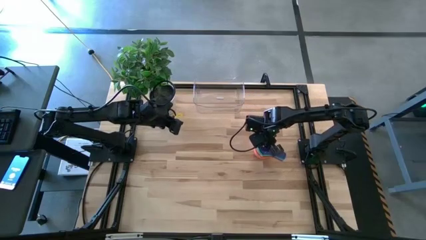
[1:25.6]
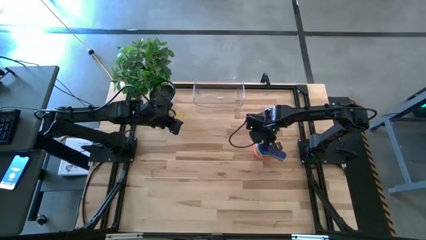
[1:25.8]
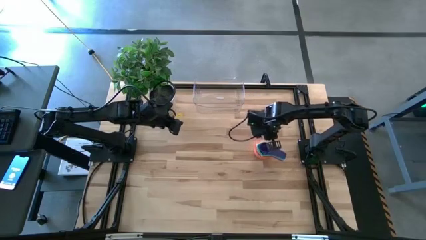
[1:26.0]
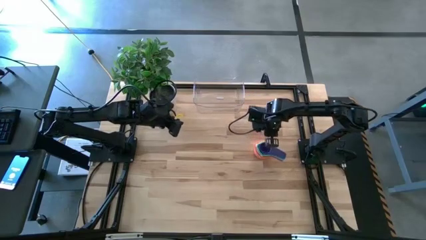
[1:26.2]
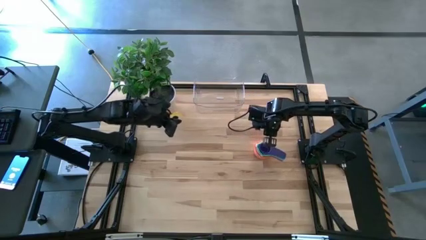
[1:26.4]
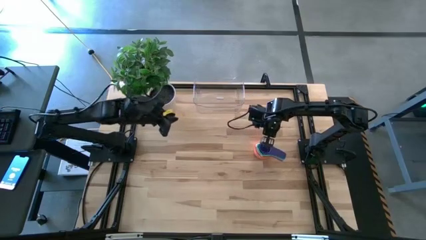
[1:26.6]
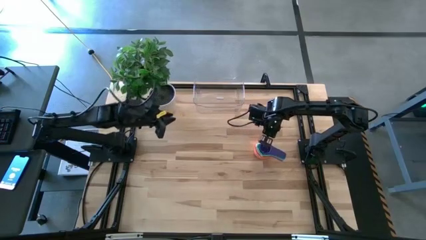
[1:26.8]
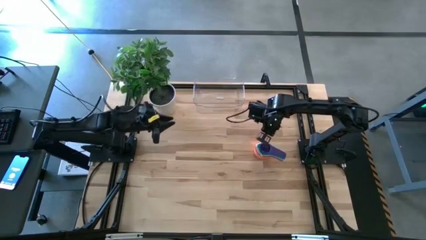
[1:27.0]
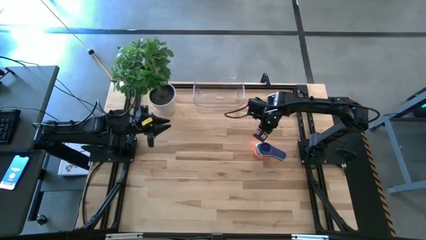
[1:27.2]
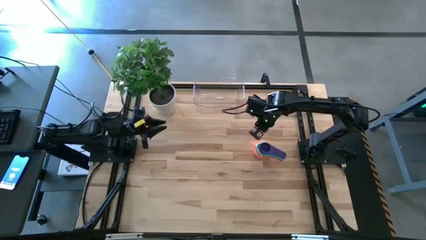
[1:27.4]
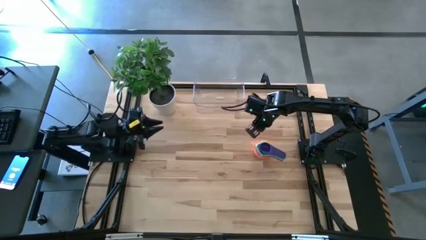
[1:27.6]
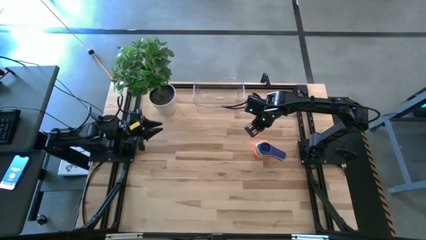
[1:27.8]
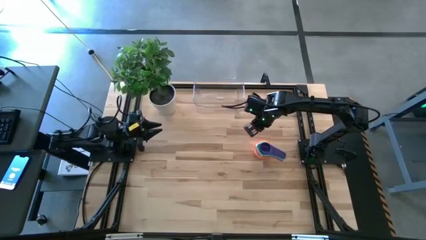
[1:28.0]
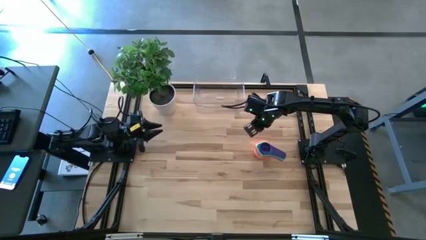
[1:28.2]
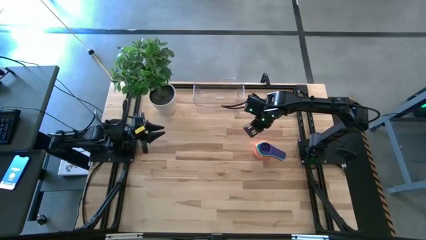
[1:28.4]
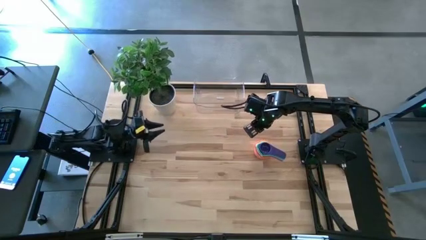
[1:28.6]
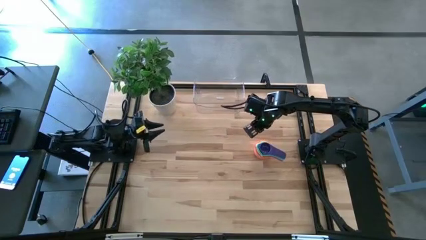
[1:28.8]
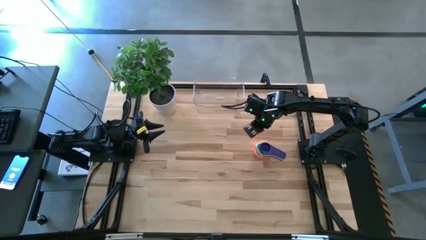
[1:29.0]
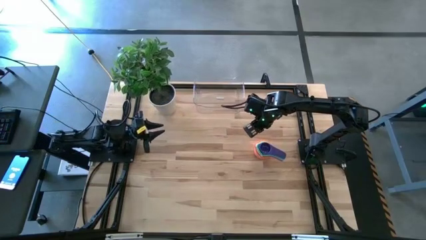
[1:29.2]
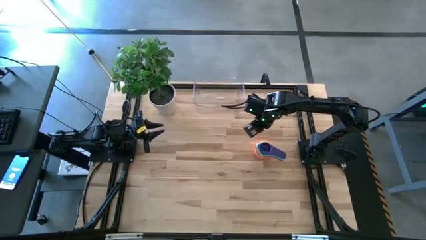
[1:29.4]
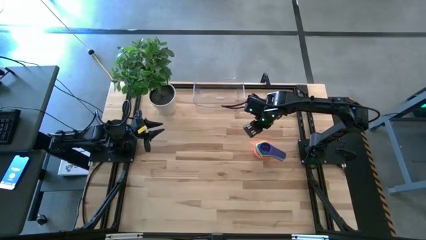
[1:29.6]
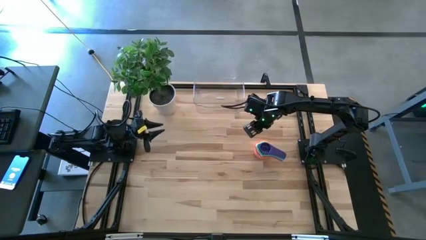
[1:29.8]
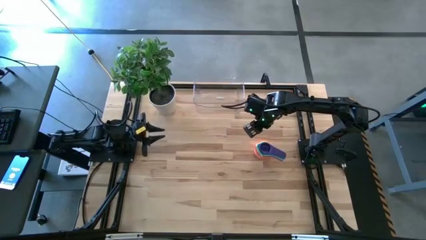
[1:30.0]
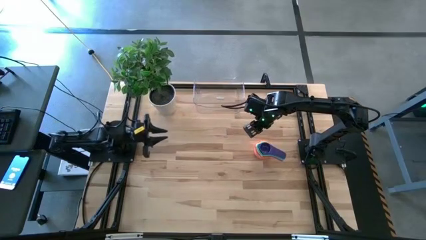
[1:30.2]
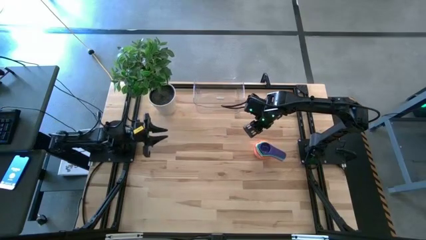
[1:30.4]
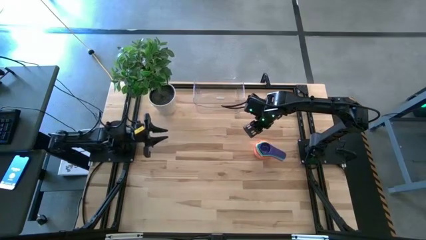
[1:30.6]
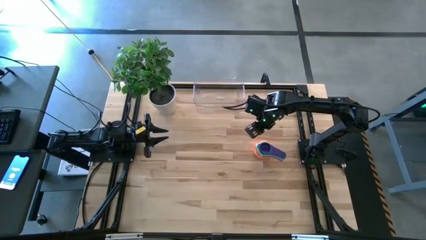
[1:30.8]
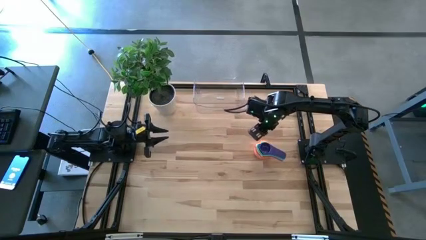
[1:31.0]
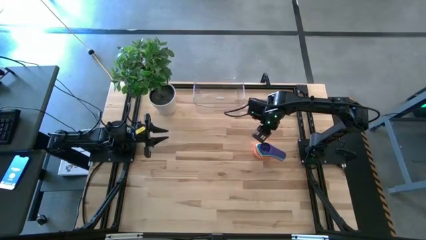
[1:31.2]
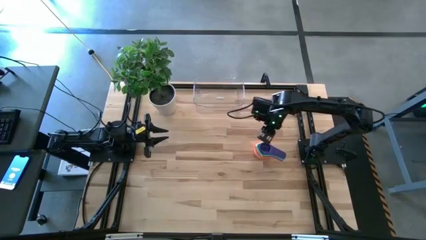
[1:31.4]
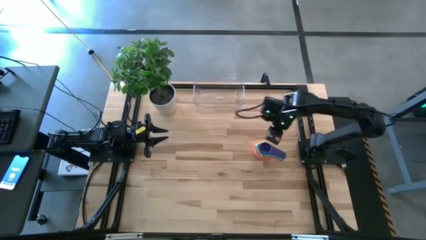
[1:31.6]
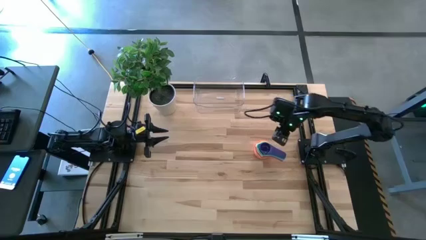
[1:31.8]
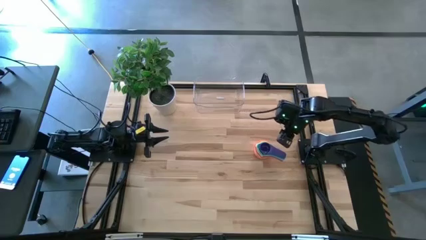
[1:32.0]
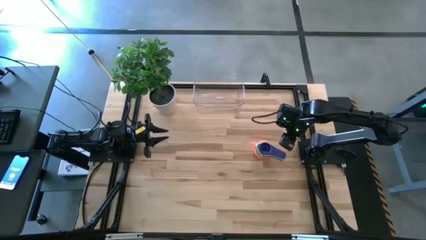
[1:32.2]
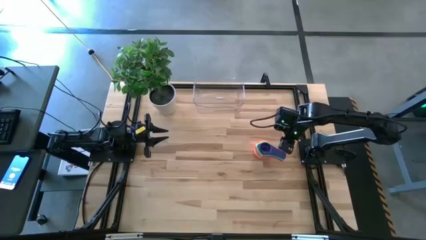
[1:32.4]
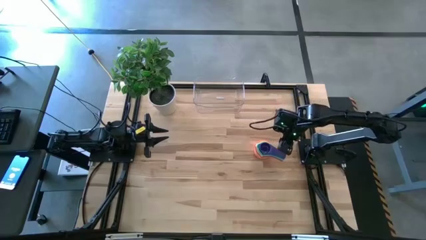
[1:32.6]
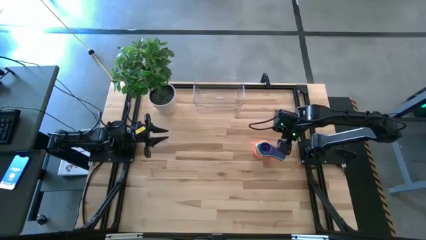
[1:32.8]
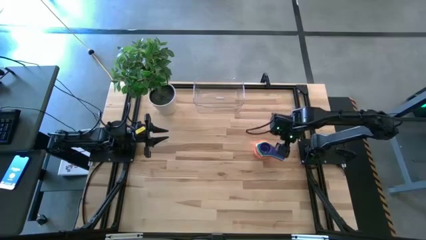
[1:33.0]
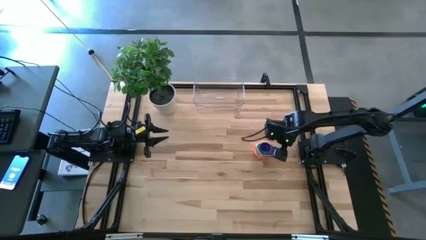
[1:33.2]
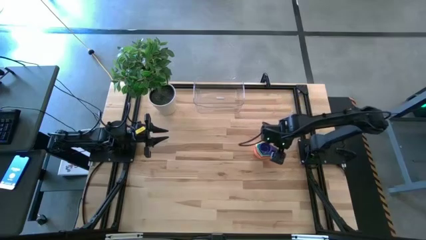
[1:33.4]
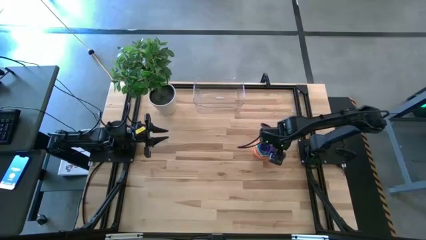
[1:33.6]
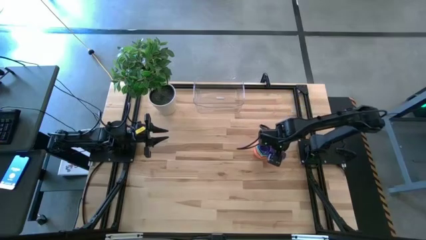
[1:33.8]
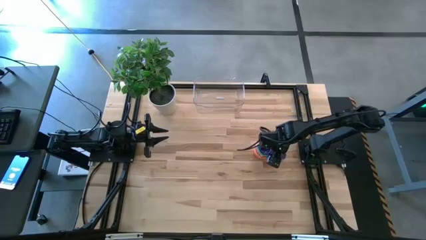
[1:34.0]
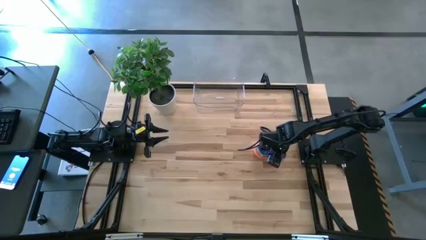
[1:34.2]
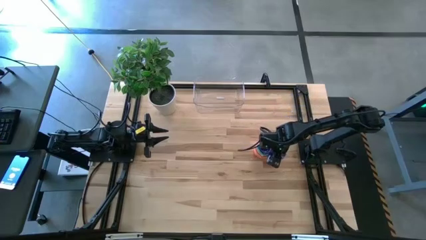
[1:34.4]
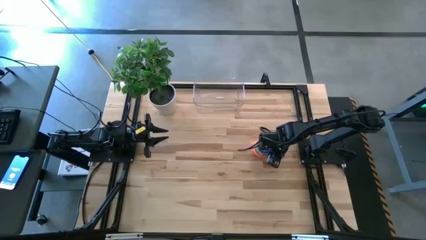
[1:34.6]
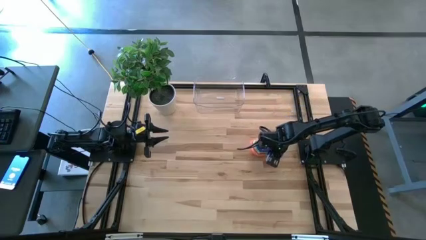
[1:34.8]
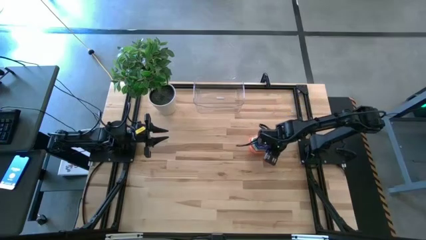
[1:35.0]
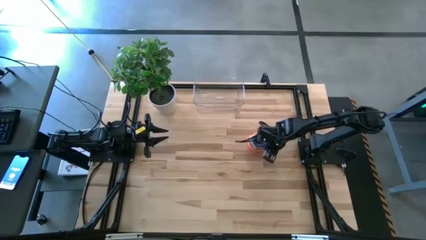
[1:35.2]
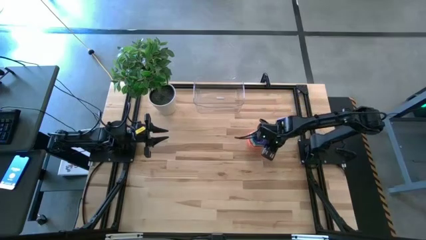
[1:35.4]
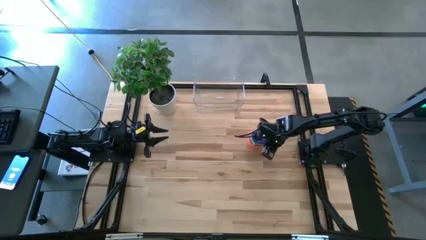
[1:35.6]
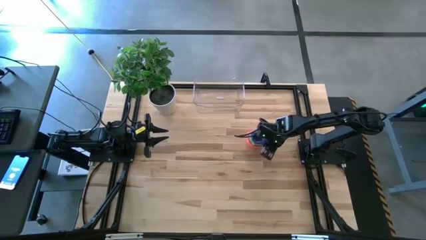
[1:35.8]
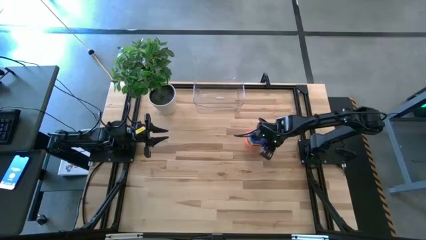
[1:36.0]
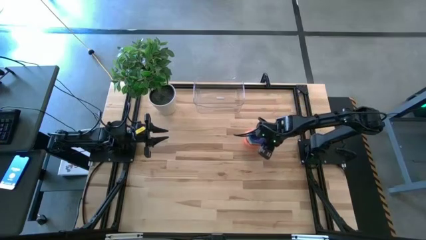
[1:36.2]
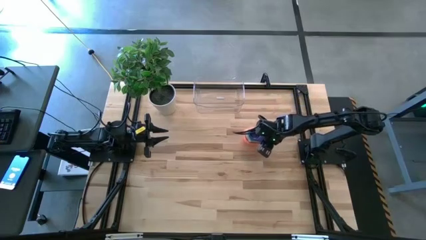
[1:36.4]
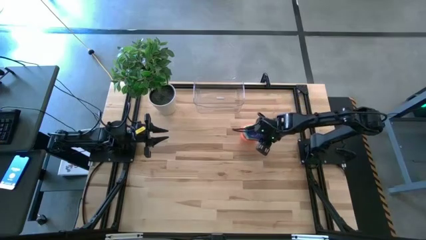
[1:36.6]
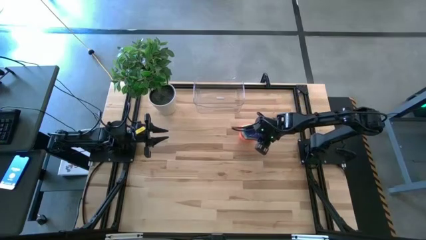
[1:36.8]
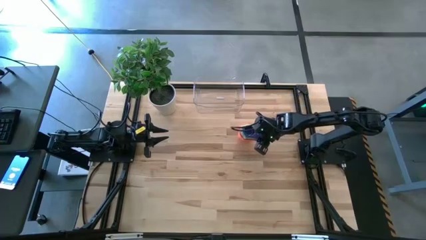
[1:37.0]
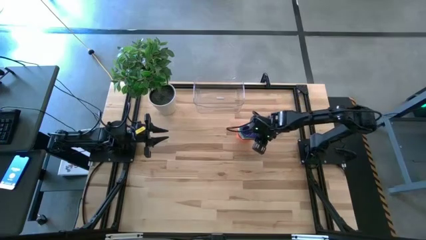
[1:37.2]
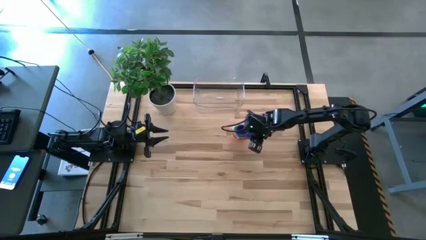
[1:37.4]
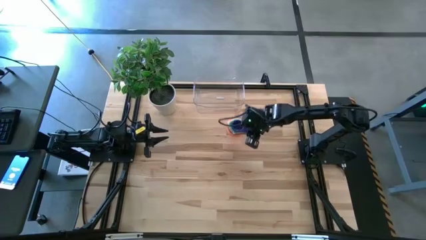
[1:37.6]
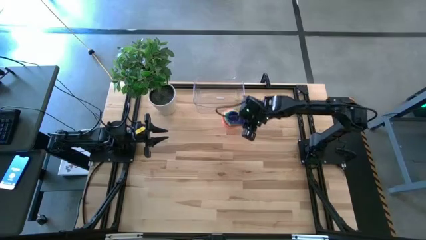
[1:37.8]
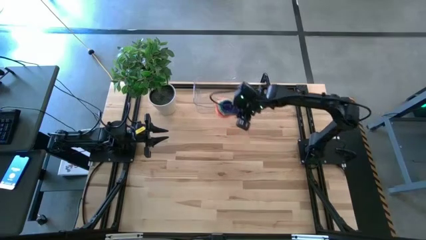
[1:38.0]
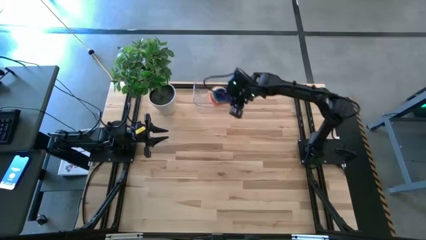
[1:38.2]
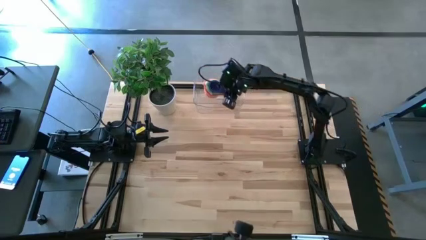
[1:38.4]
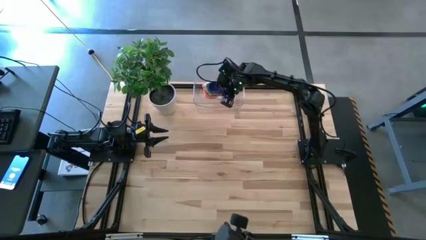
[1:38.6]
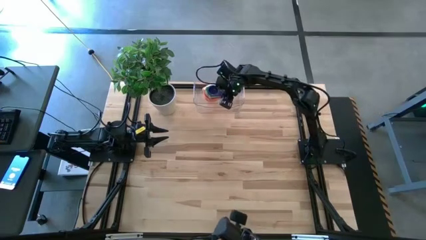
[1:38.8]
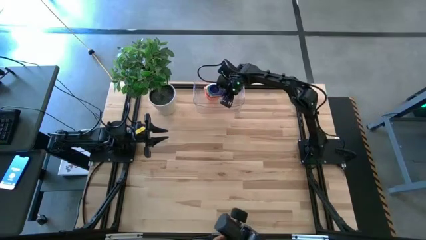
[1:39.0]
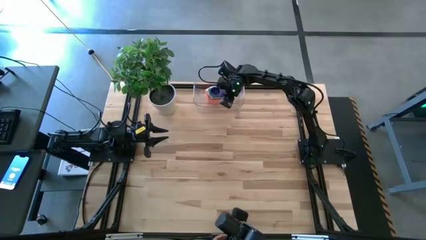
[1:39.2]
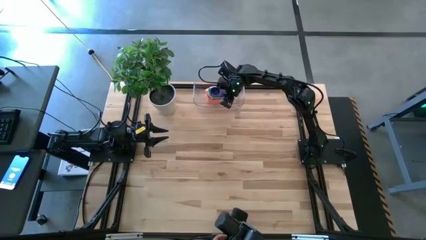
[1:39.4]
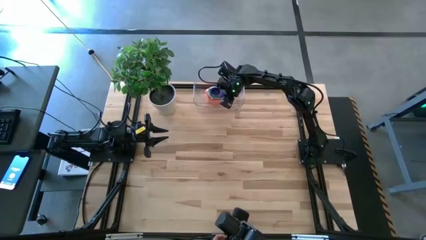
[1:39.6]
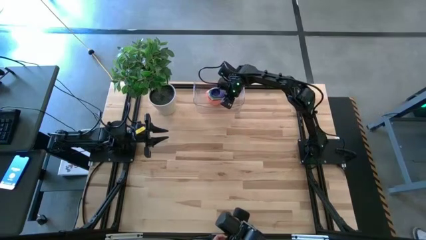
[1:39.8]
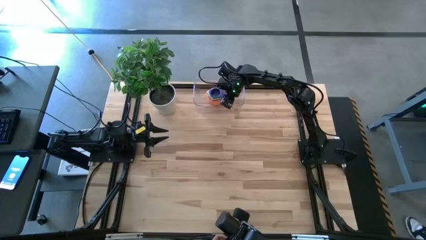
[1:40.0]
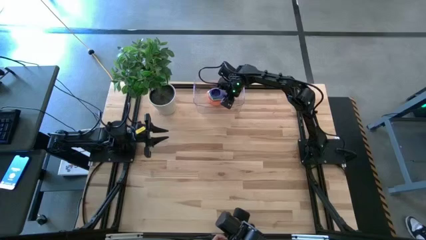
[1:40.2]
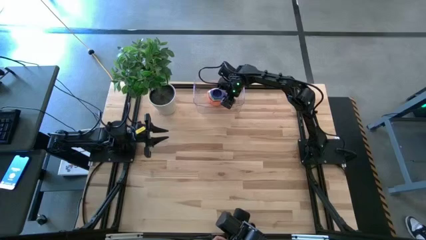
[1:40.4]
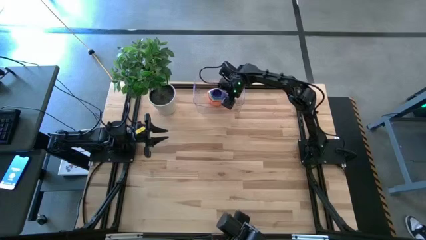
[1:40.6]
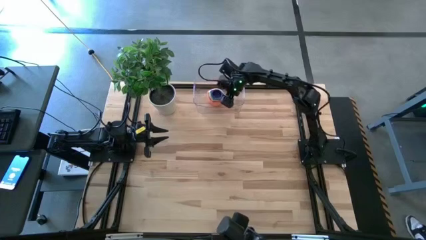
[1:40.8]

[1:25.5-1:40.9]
Task: Nest measuring cups in basket
Put the stacked measuring cups into the transparent bin
